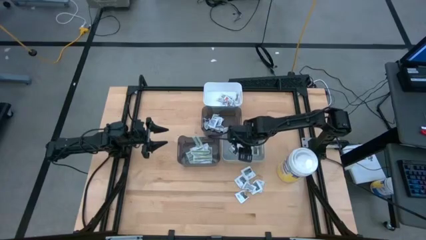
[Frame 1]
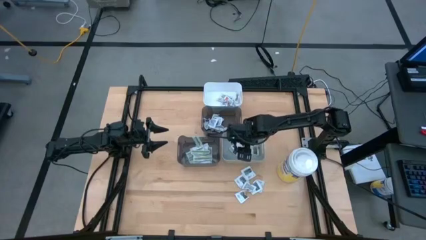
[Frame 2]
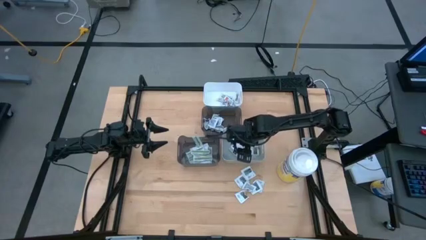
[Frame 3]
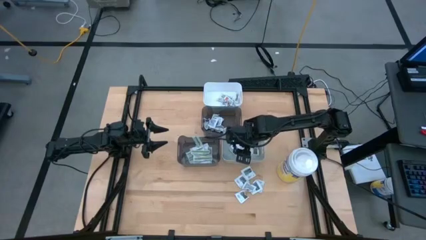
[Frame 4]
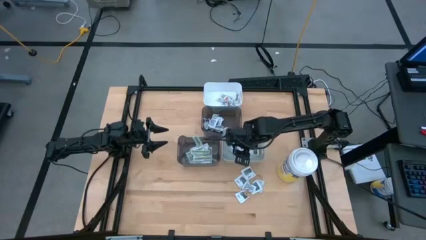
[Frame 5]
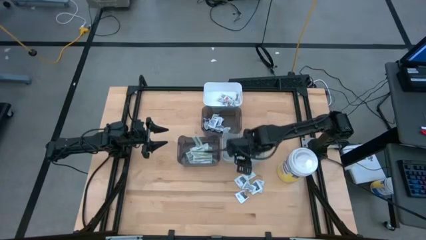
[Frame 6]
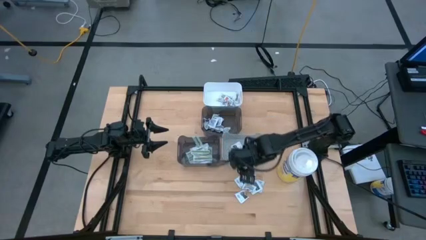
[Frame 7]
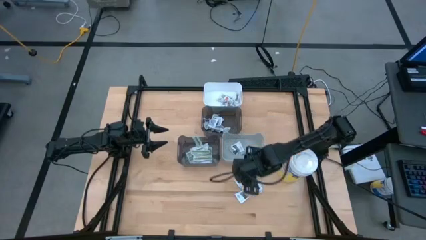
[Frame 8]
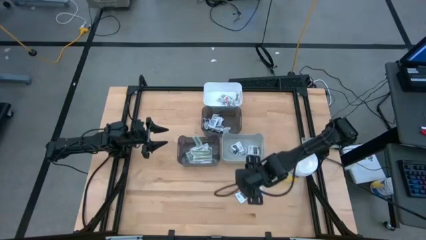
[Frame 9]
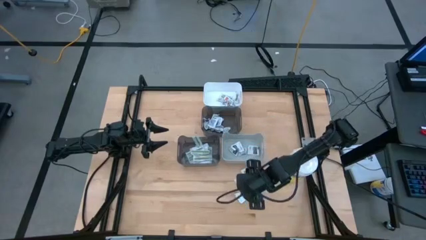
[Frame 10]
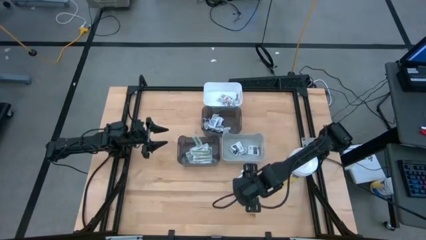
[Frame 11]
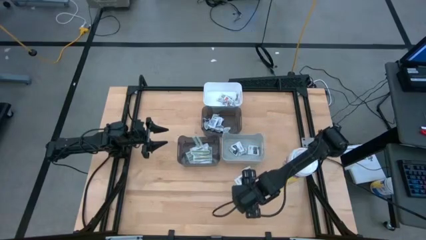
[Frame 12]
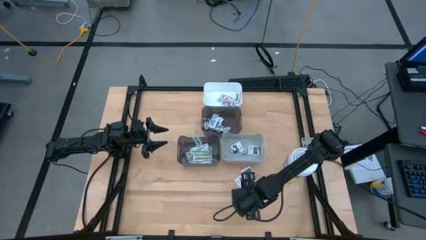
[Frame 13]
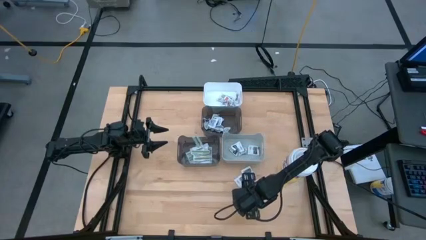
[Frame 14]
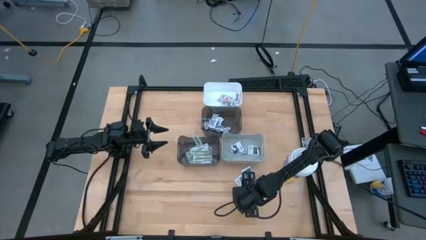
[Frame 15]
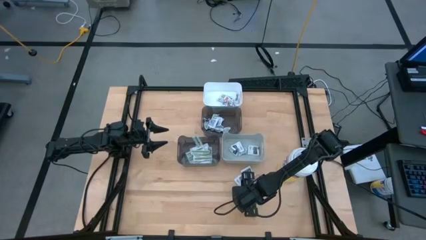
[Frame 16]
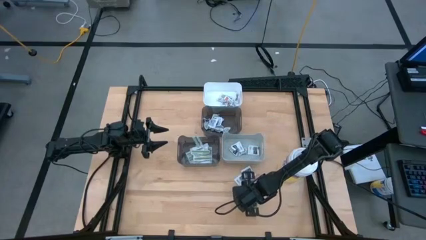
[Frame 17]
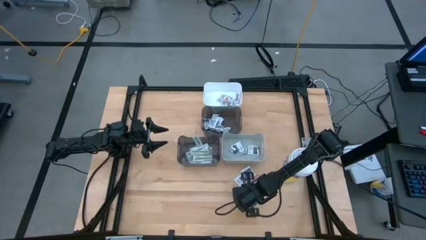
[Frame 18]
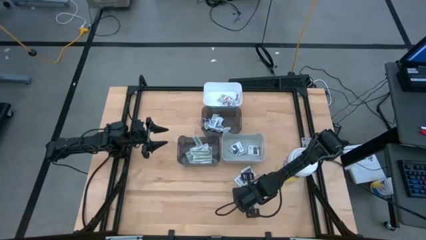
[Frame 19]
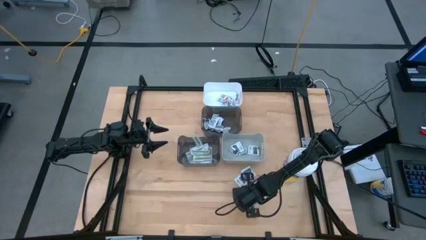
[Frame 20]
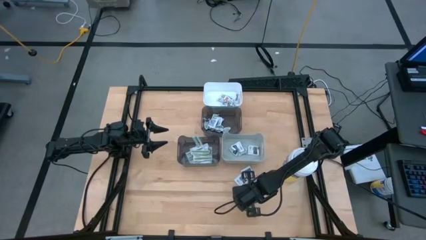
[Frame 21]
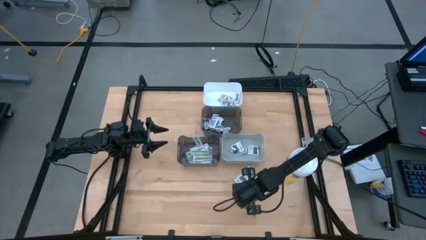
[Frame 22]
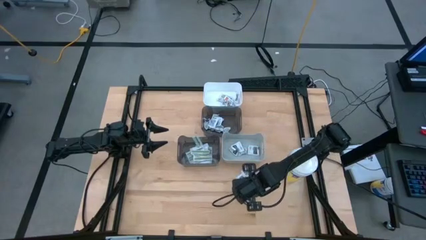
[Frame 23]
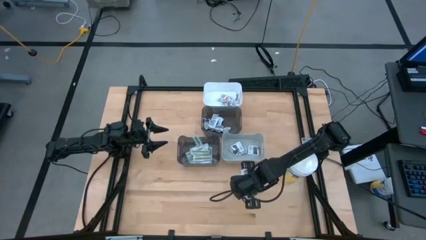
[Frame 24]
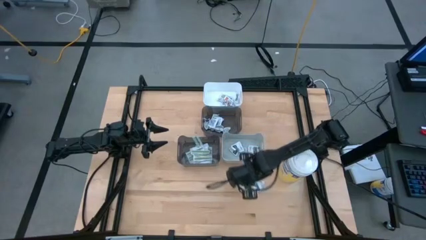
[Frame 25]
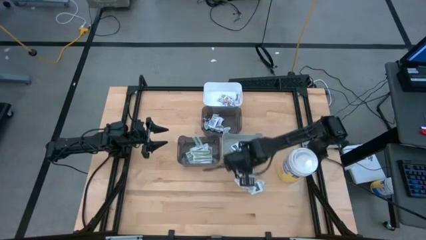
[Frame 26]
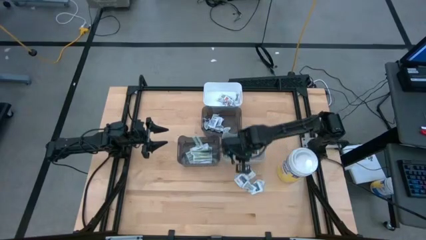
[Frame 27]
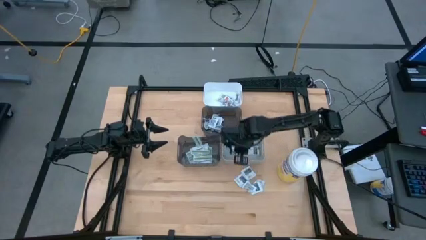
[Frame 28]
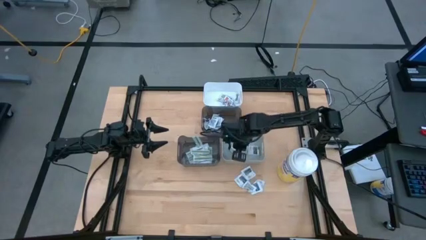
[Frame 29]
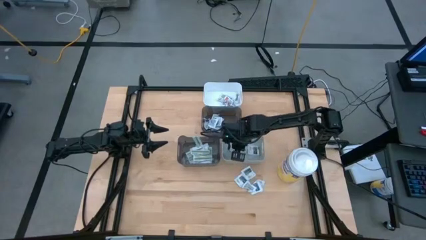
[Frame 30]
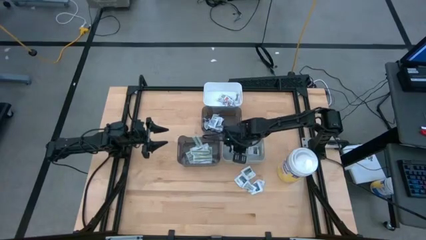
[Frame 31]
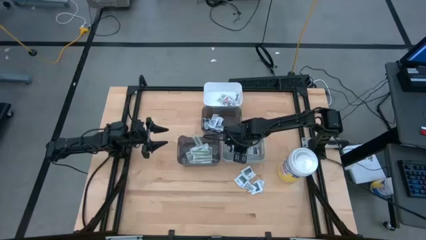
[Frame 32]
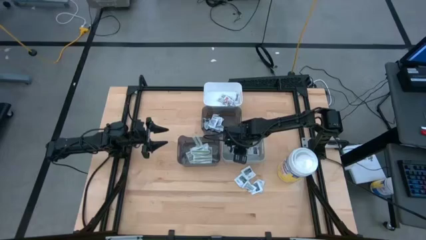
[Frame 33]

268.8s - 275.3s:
Task: Pick & Place First Aid Supplies
Put the white towelette pack into the gray bin

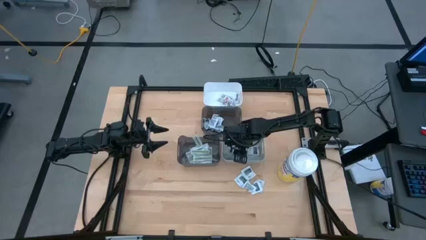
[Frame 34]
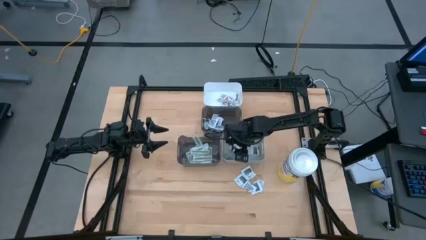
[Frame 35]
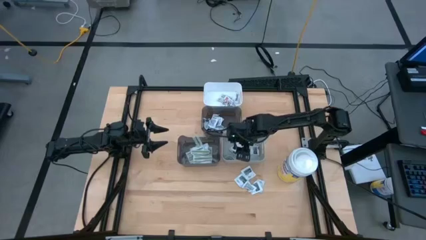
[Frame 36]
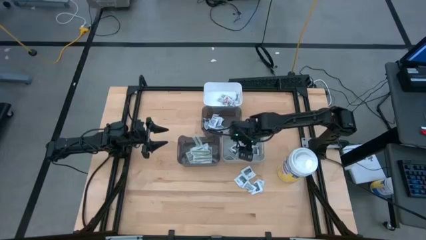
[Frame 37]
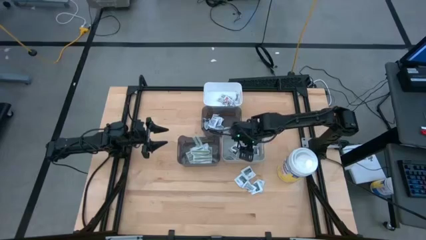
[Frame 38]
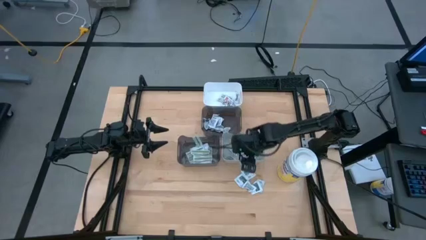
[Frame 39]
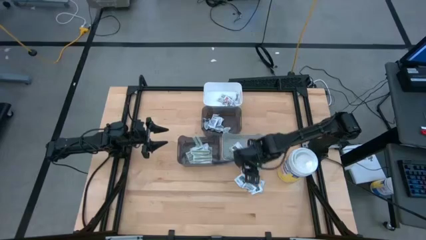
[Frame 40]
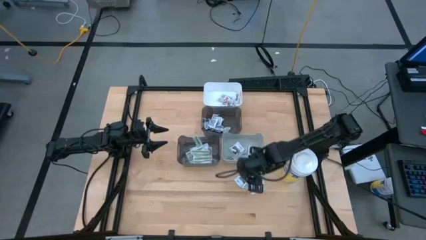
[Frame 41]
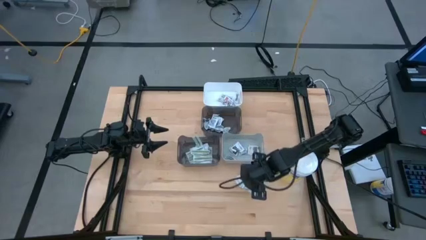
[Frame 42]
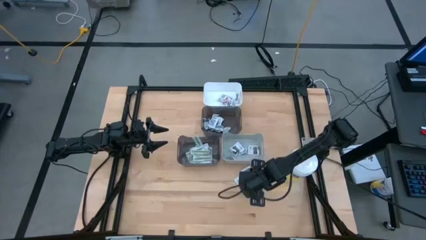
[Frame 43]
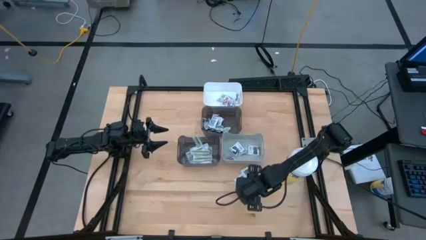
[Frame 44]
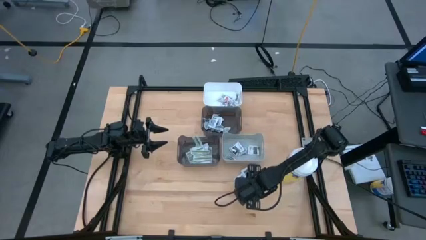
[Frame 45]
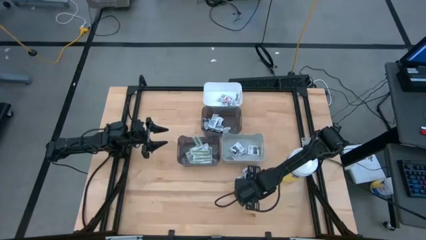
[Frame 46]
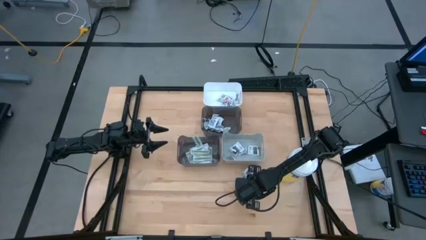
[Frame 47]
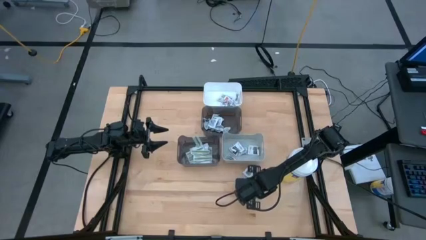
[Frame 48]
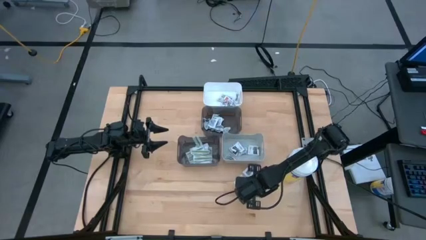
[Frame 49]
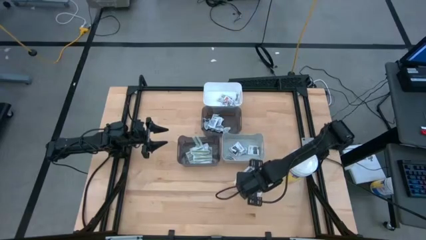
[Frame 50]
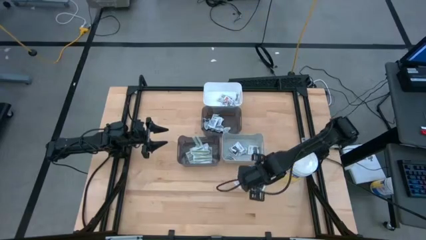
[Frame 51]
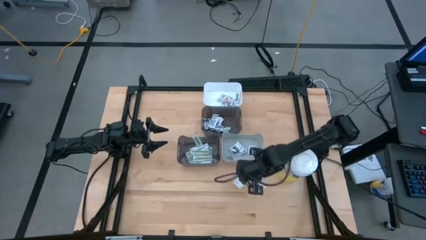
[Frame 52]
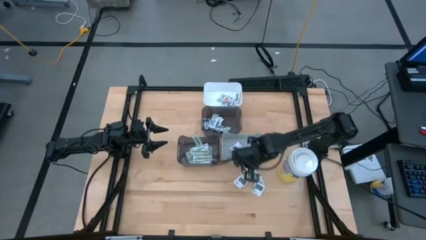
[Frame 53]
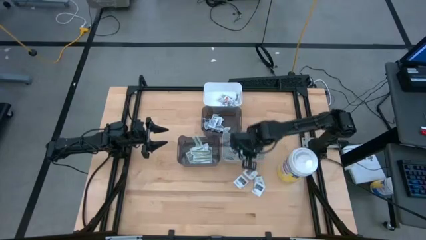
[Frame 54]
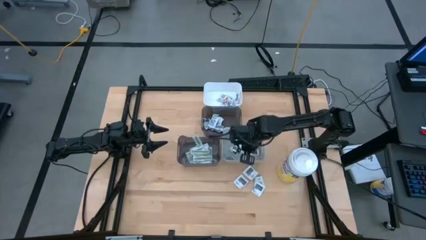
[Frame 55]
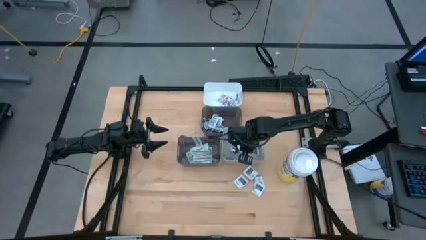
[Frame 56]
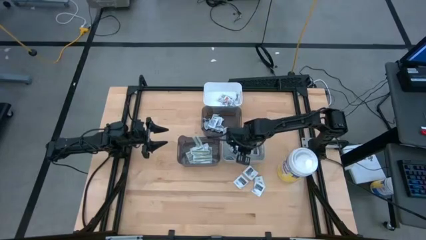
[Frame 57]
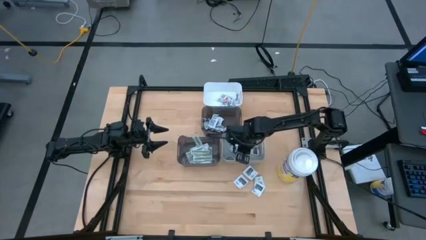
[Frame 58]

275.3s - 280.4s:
Put the white towelette pack into the gray bin

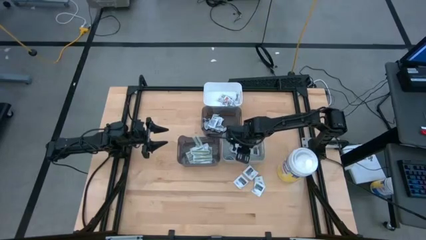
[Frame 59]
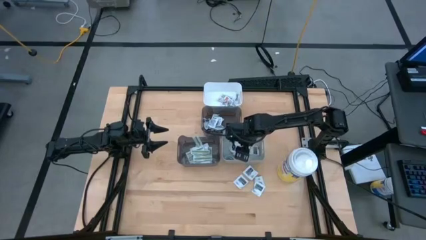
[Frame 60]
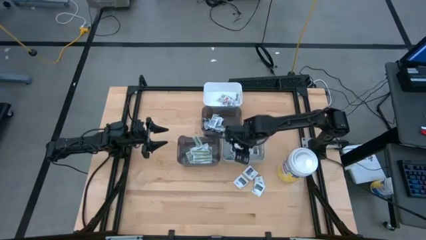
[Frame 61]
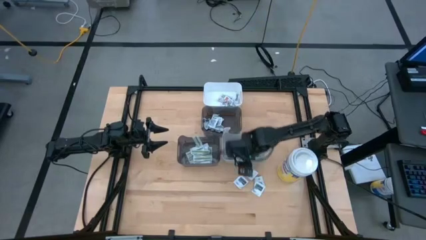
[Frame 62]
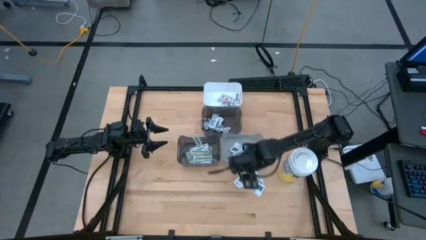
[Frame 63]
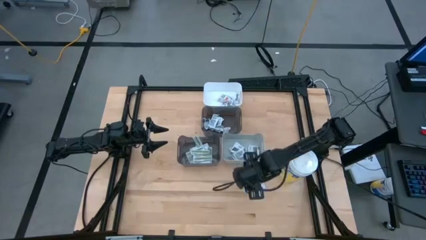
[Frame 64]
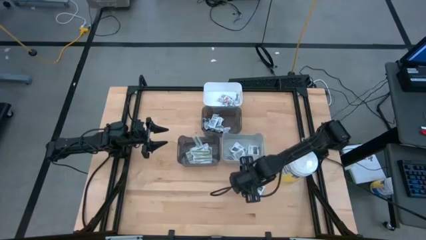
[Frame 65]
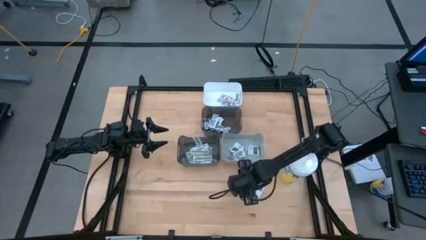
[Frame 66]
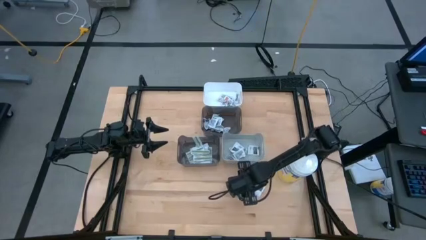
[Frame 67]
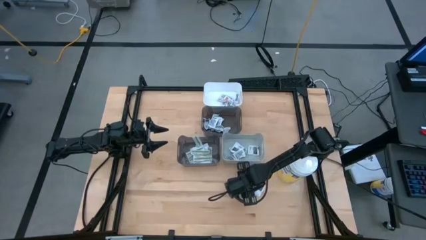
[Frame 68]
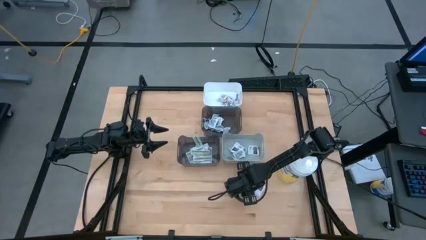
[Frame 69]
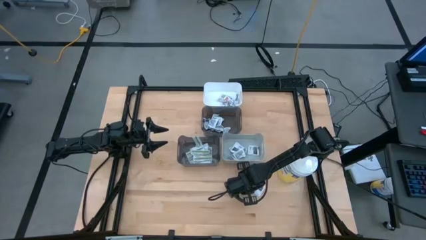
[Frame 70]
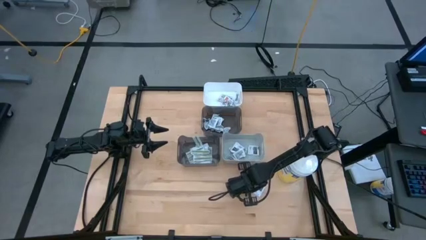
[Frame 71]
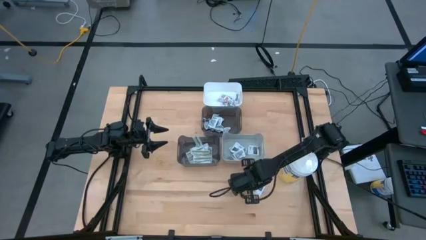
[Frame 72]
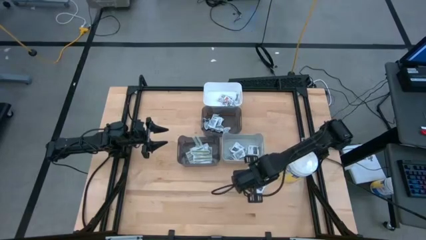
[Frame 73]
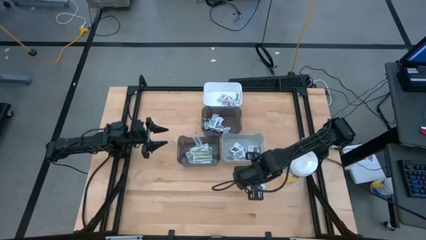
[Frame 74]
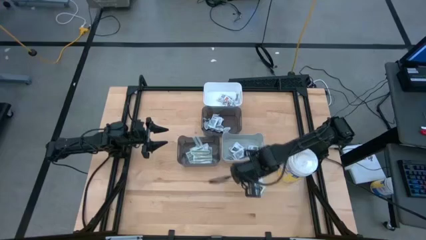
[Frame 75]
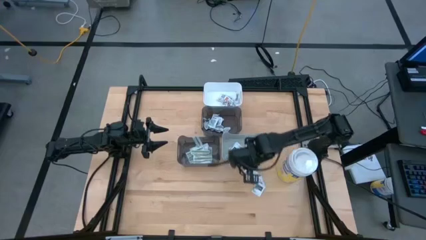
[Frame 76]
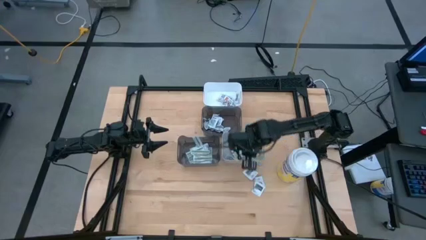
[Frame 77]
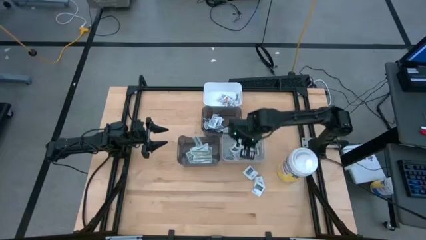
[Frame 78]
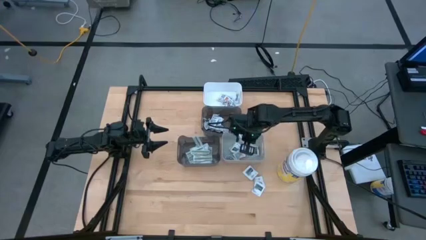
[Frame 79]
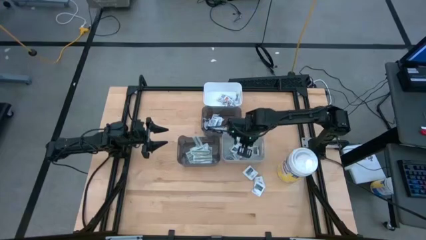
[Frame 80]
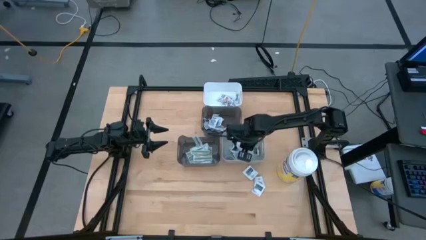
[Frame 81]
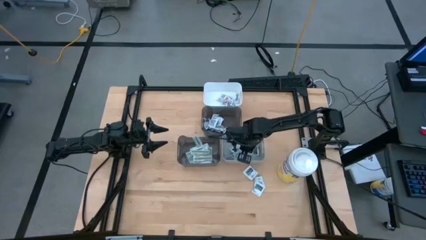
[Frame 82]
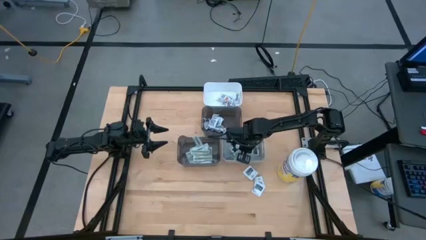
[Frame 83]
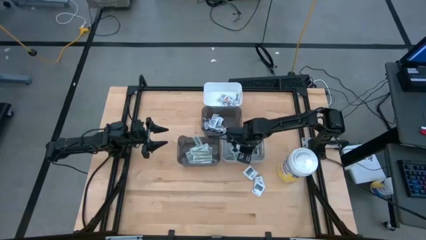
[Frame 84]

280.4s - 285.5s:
Put the white towelette pack into the gray bin
